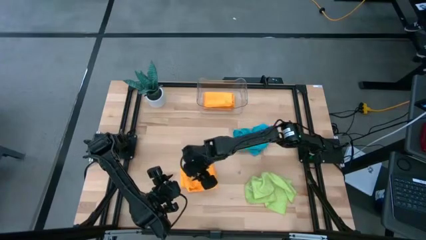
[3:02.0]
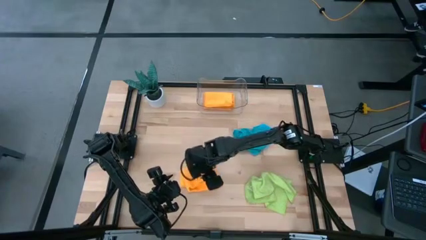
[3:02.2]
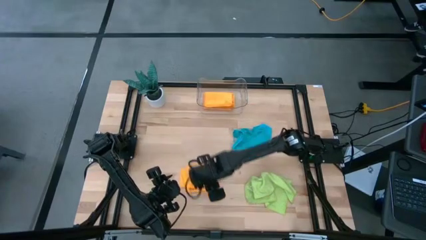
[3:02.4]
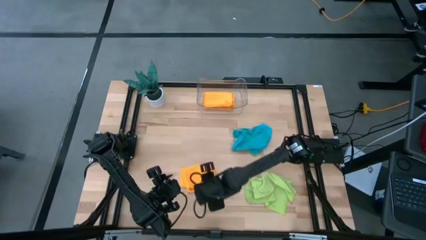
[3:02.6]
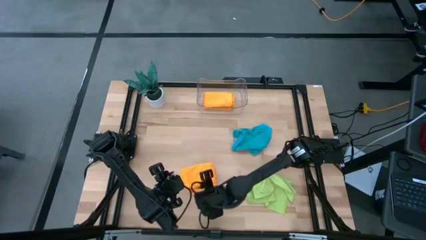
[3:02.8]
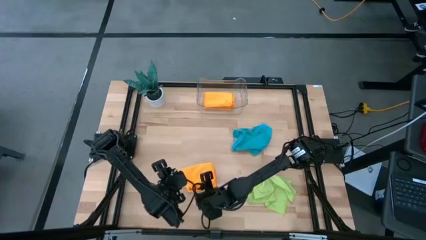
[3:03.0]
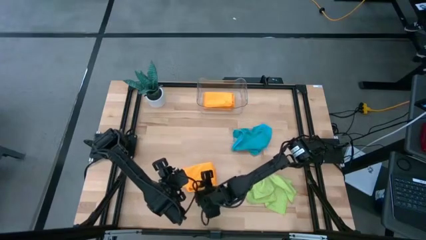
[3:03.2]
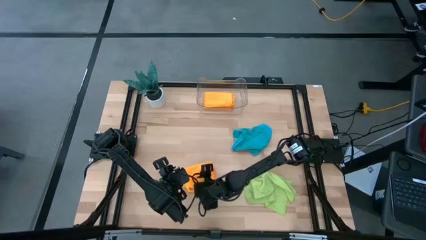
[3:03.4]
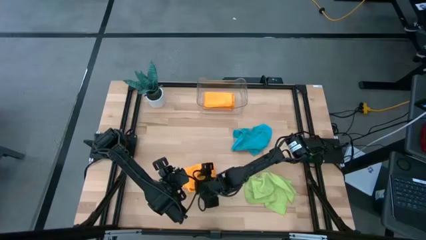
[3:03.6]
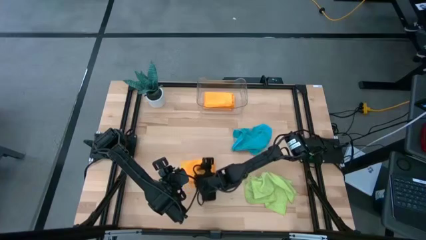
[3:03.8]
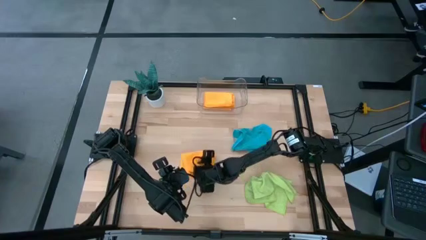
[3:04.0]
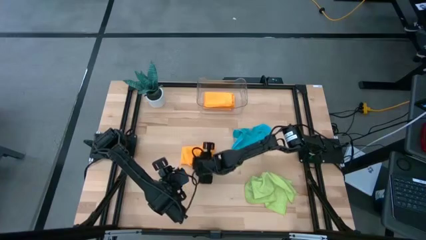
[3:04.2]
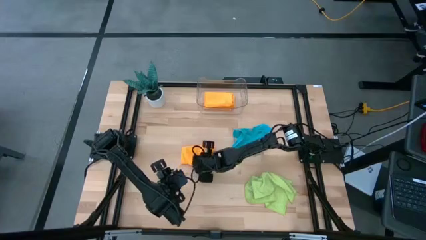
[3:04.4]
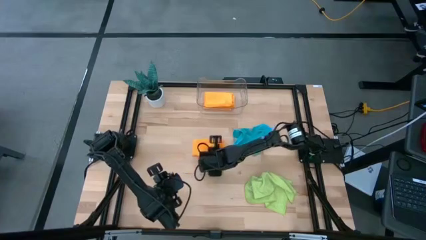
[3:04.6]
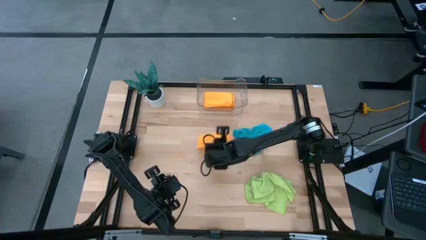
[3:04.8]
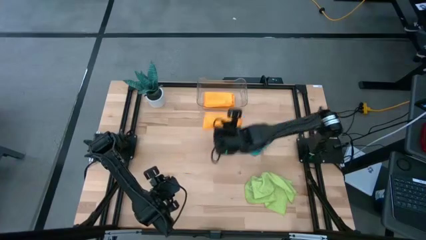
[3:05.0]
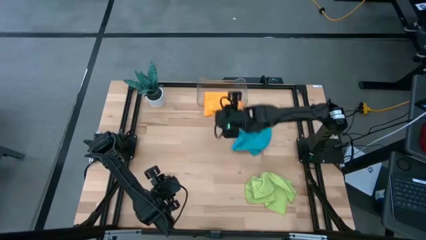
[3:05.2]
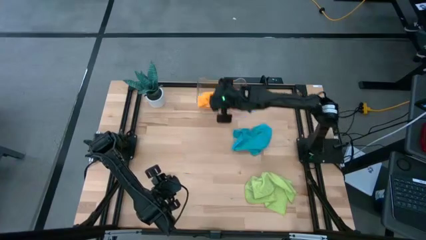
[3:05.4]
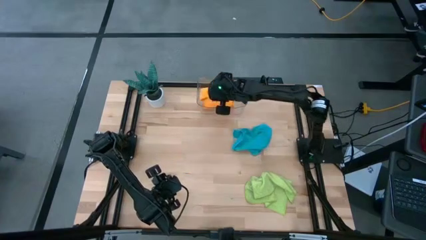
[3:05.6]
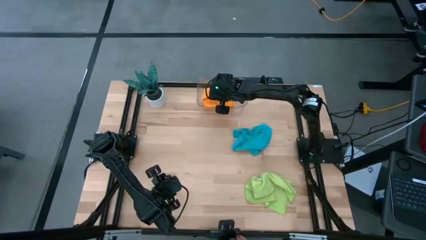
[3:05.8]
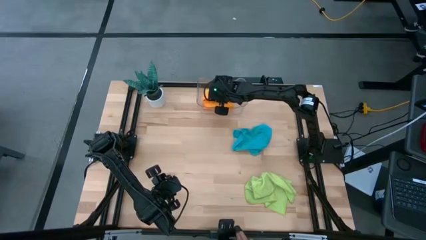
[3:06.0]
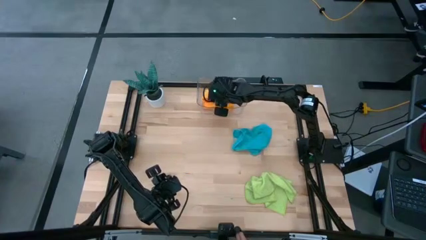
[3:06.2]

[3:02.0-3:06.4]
Task: Fold microfiber towels
Put the orange microfiber towel into the transparent bin

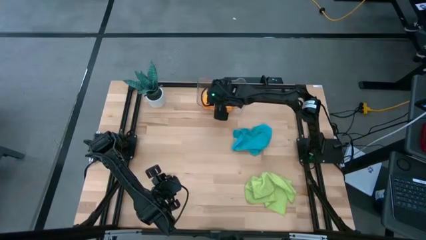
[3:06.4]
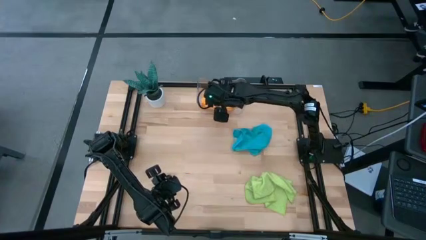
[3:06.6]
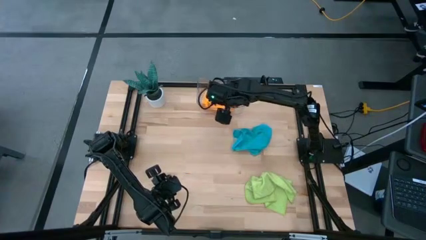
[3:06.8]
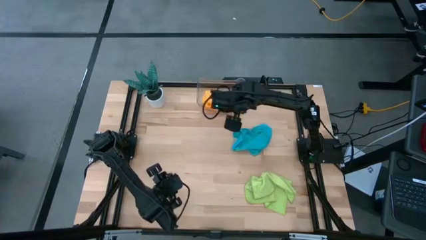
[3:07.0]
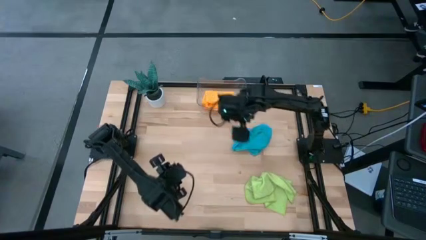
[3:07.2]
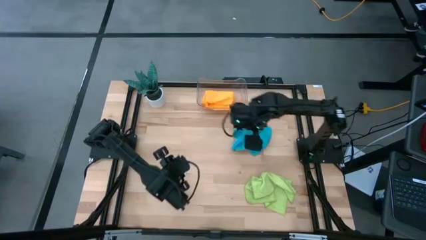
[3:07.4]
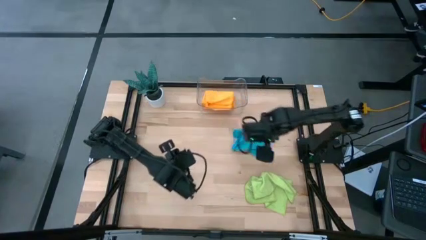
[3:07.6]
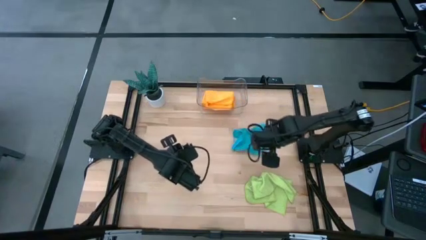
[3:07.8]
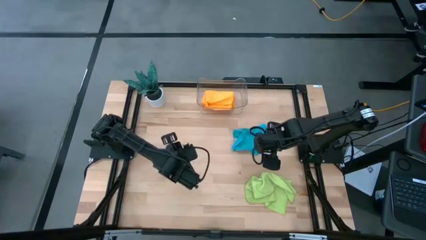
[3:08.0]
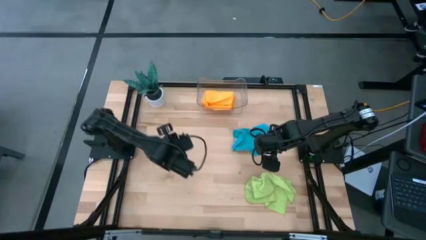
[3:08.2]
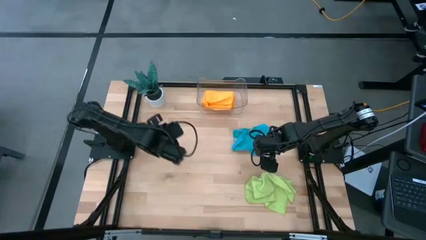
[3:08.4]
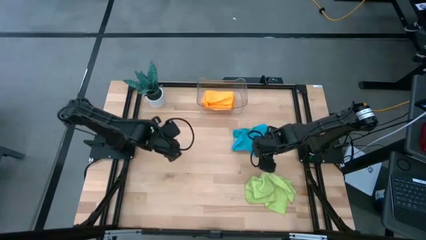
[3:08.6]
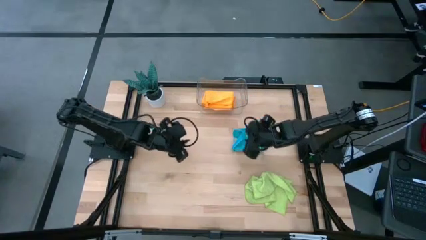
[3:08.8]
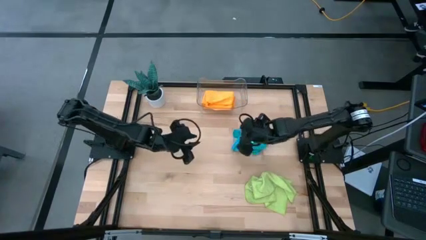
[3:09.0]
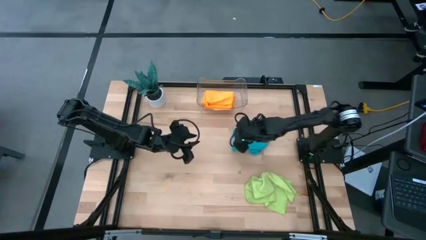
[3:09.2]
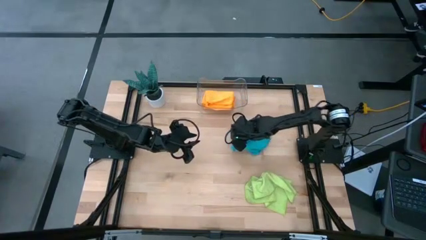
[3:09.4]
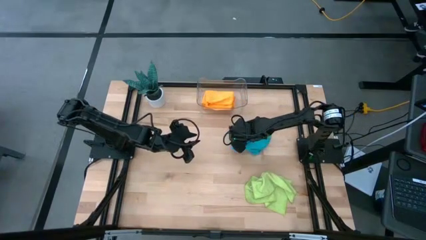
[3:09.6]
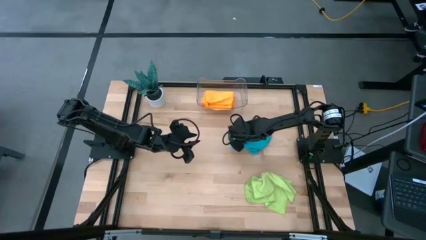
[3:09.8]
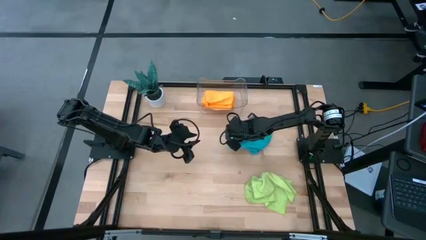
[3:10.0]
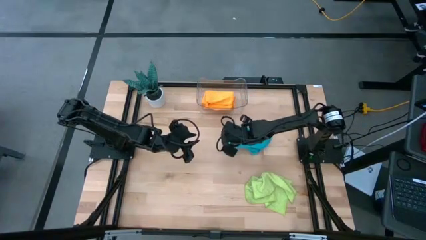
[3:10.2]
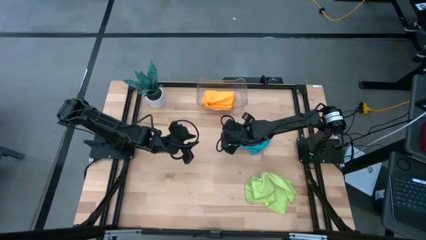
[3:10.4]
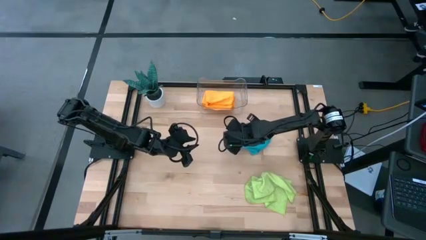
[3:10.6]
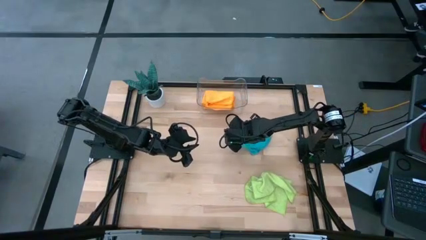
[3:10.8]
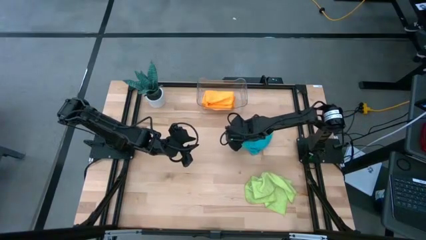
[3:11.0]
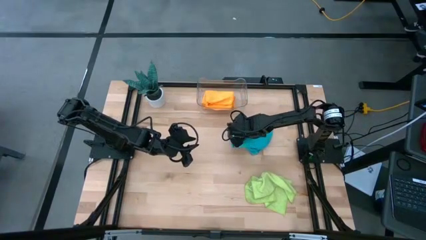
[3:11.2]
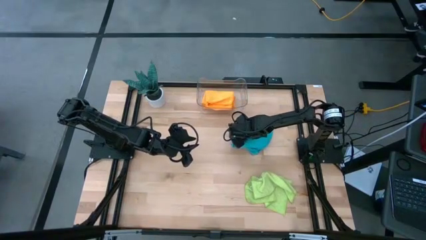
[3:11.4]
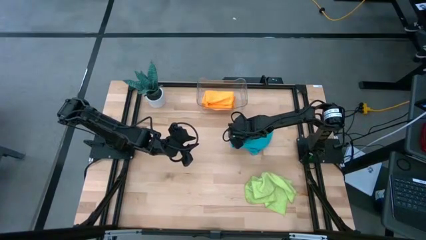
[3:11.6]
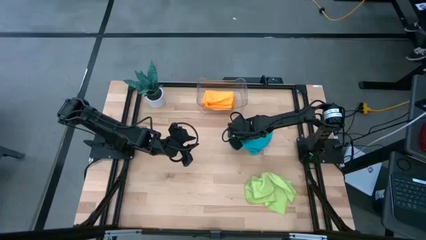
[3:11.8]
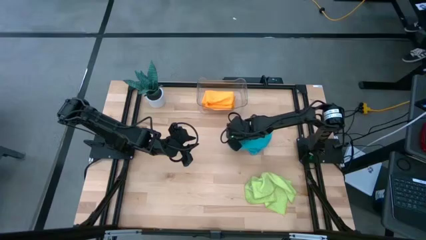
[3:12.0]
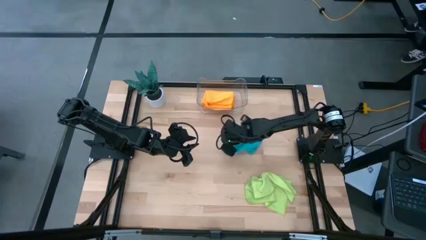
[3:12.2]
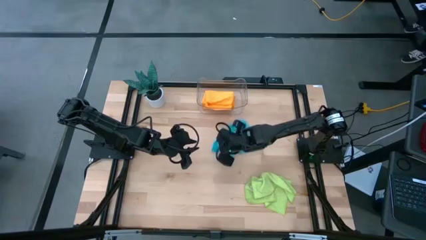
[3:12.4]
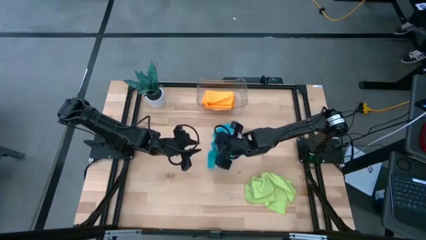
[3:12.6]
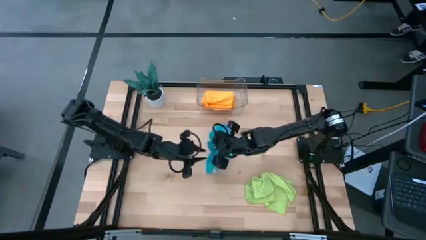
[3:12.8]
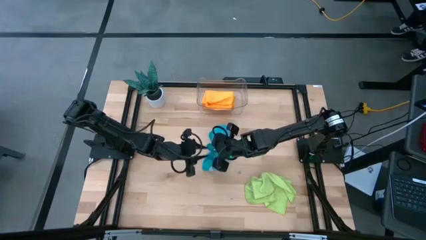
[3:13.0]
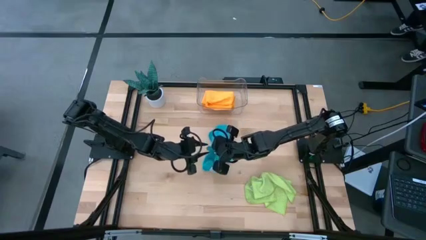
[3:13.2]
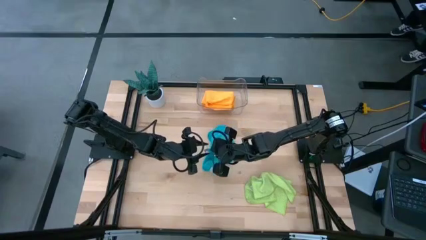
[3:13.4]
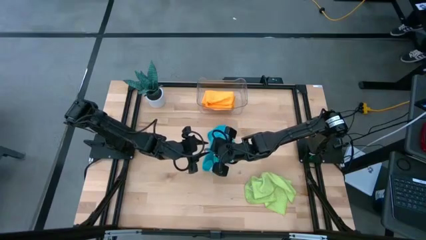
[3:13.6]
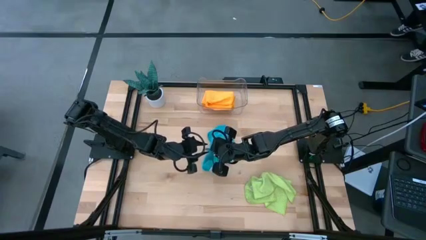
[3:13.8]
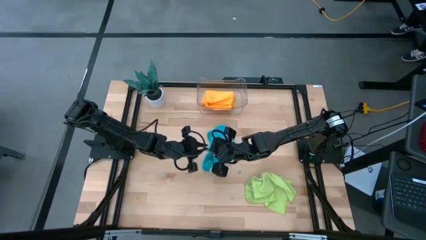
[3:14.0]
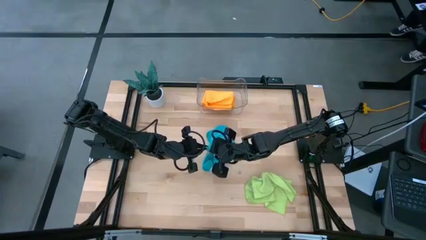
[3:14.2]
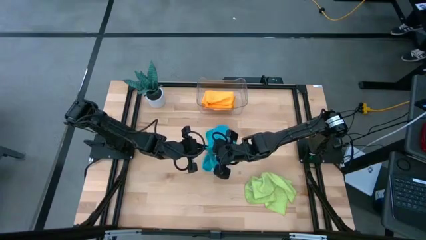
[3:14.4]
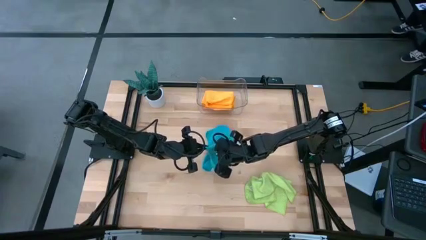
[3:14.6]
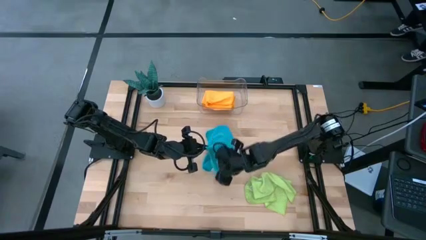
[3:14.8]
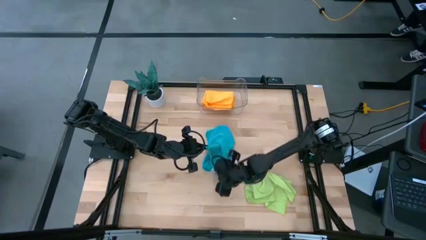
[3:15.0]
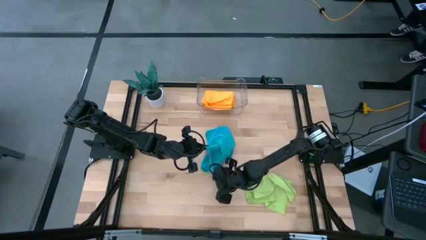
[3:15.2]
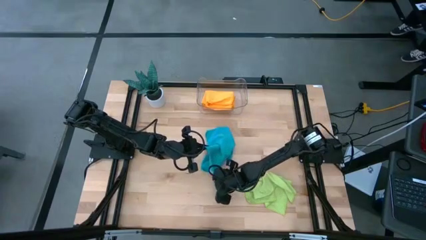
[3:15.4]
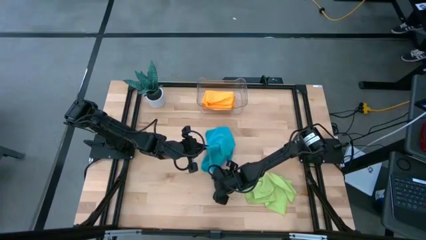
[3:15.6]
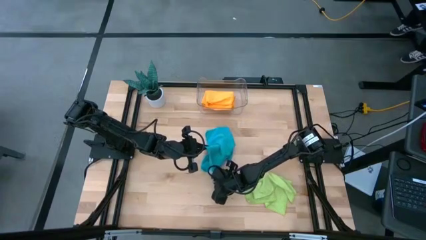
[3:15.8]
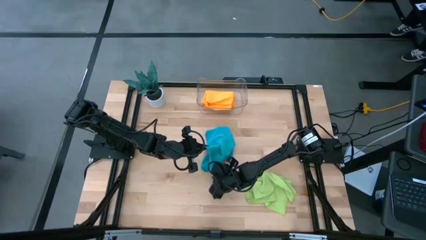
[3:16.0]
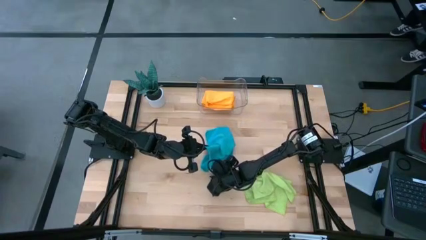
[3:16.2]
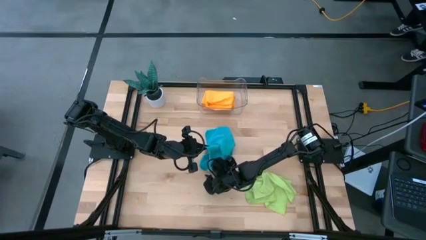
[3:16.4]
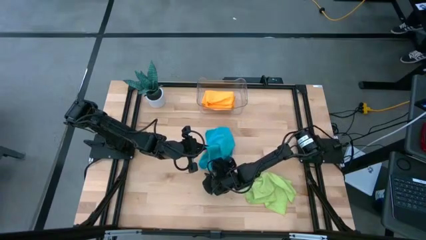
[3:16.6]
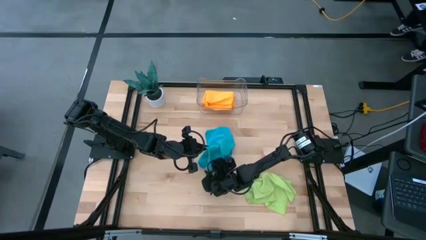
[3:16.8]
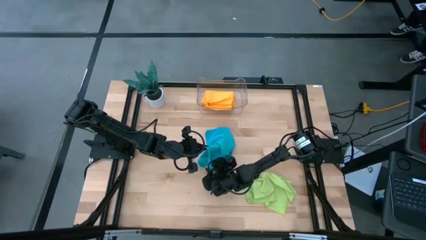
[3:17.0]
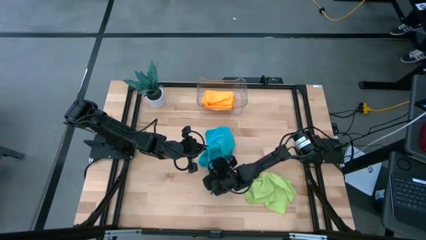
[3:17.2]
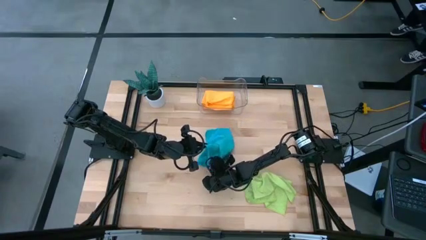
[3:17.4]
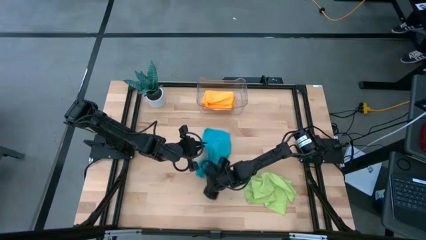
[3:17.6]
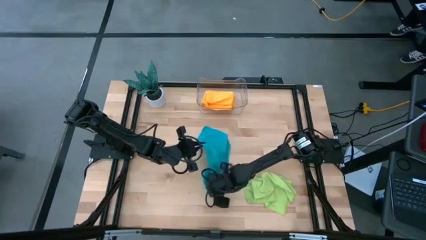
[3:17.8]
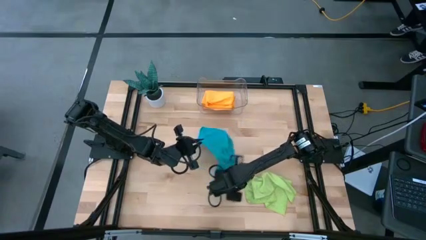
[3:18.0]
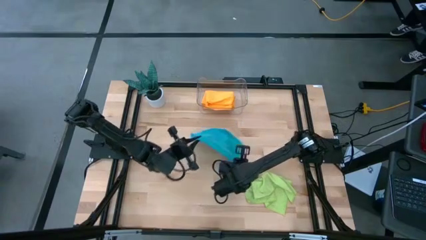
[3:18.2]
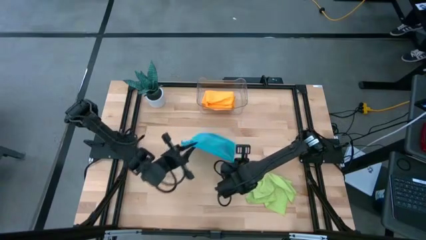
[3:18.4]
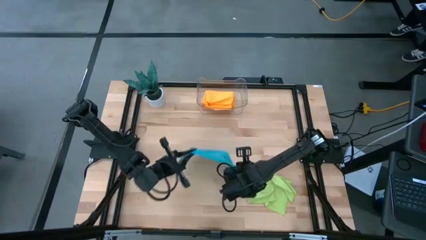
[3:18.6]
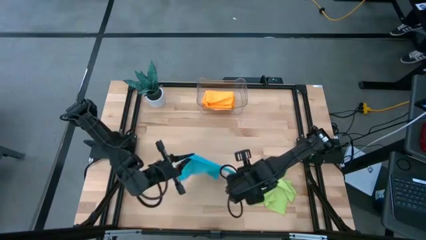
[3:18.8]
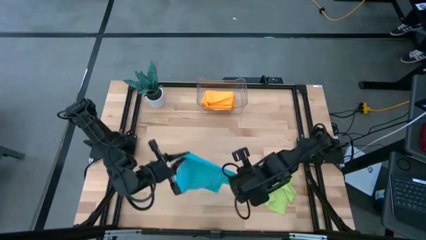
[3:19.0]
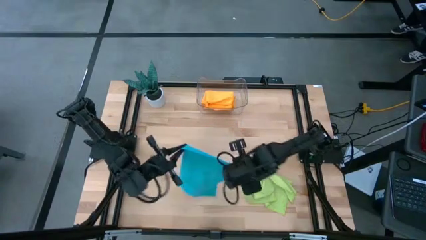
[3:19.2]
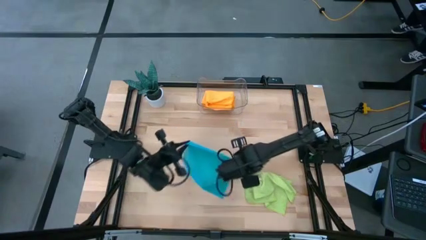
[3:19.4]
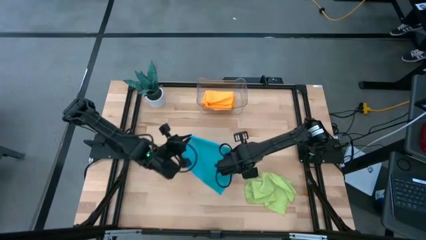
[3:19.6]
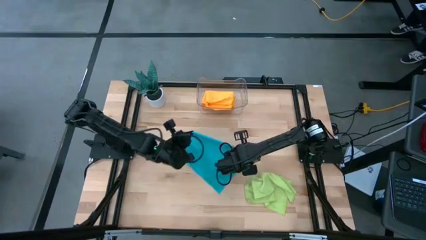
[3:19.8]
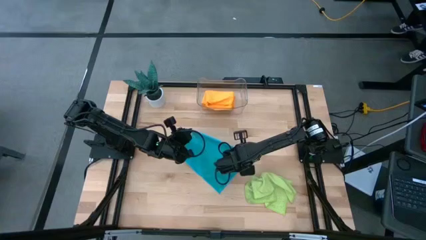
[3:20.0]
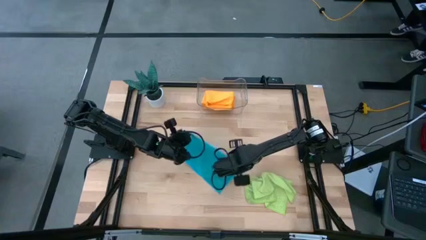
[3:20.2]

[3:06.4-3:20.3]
Fold the blue microfiber towel
